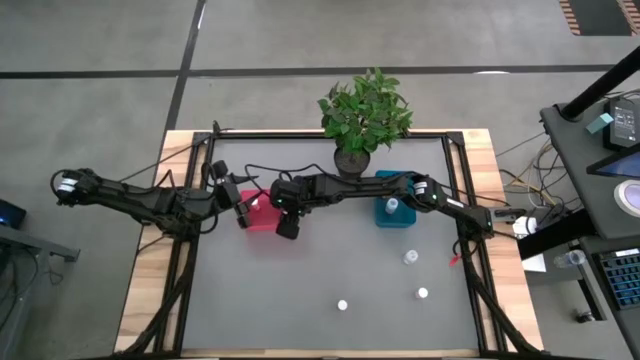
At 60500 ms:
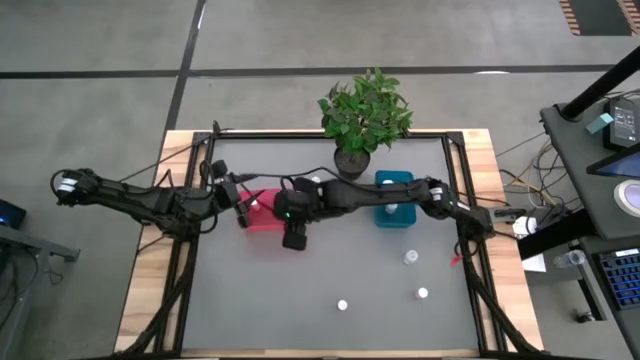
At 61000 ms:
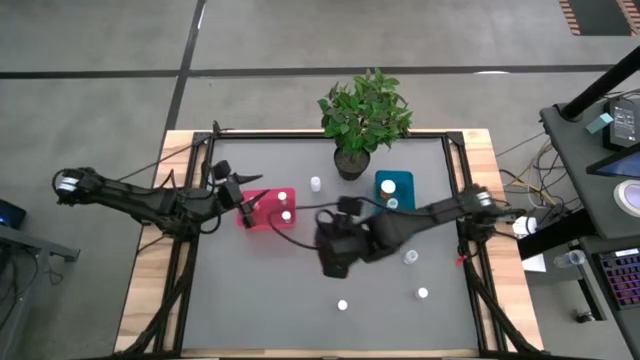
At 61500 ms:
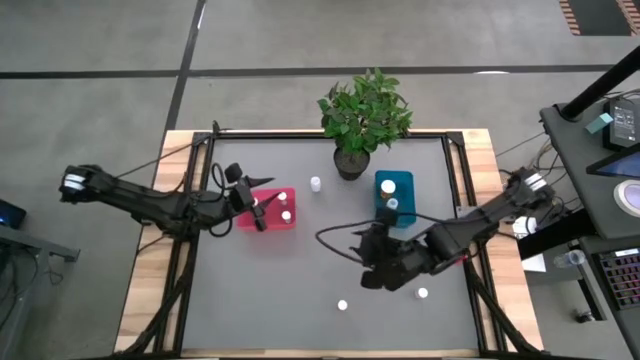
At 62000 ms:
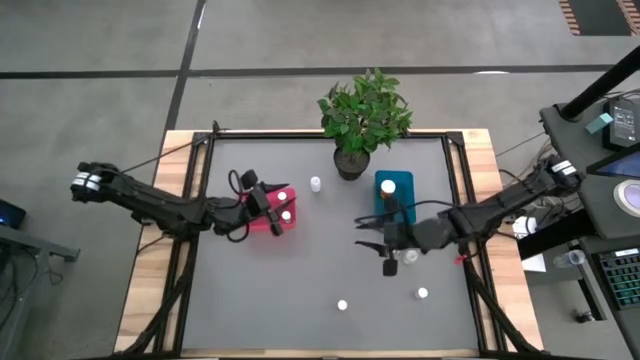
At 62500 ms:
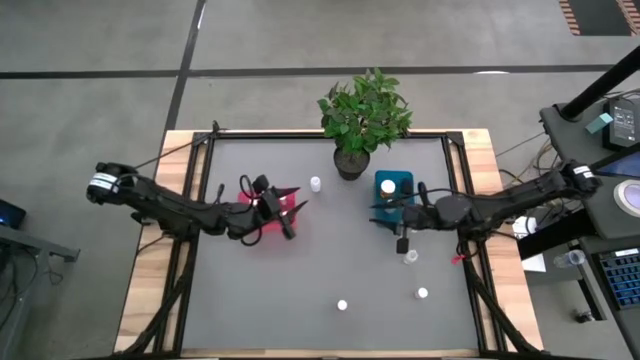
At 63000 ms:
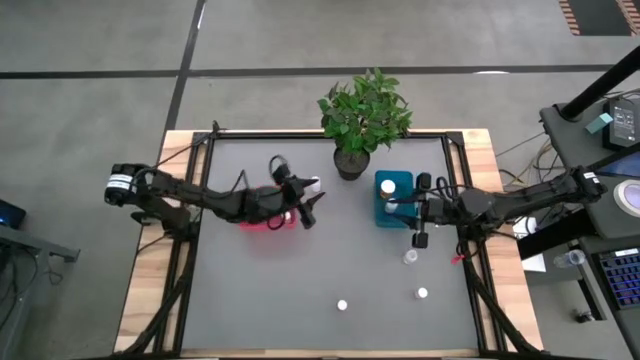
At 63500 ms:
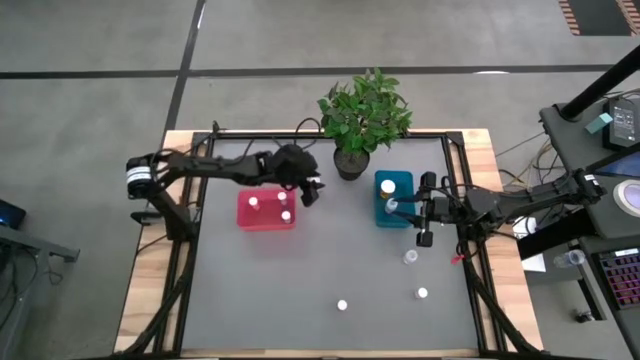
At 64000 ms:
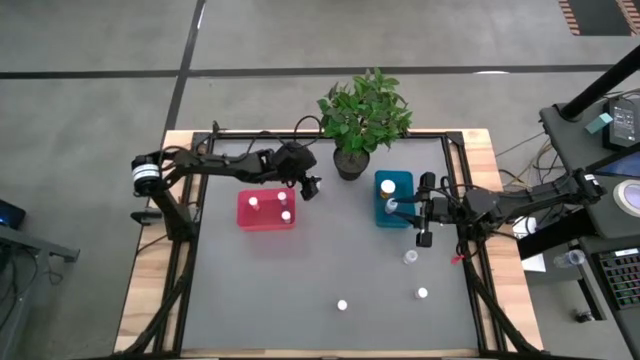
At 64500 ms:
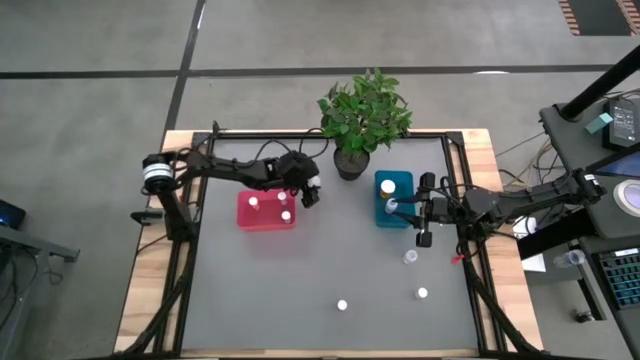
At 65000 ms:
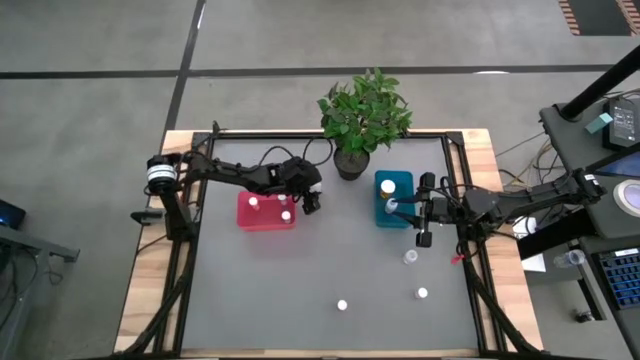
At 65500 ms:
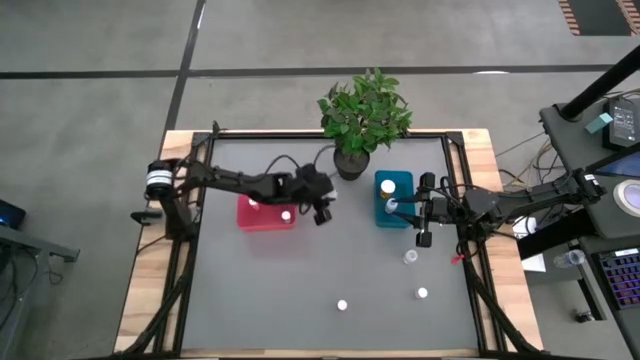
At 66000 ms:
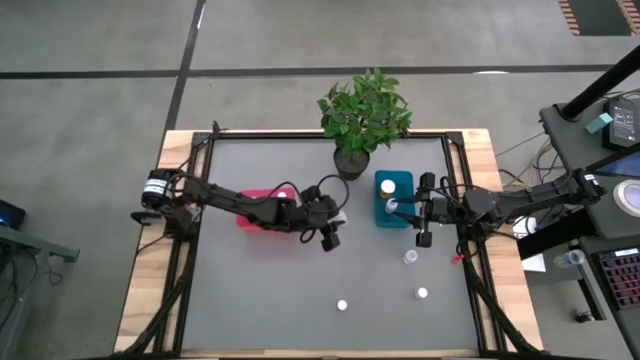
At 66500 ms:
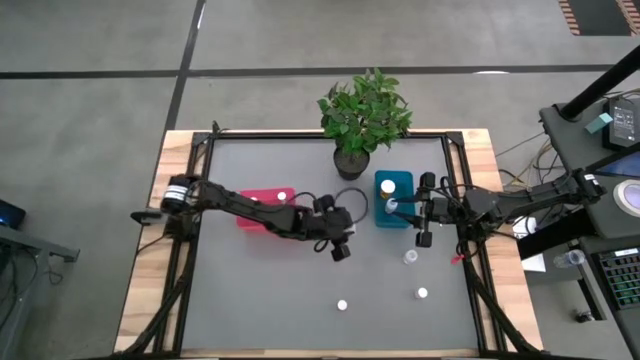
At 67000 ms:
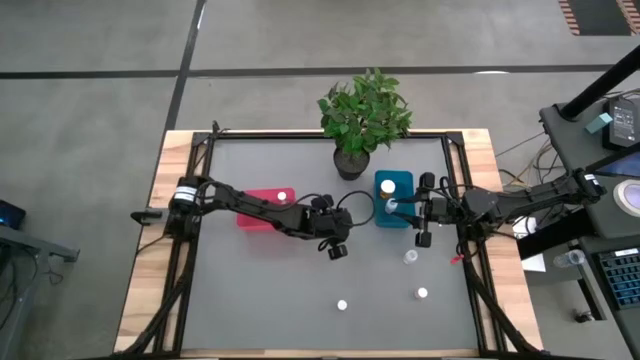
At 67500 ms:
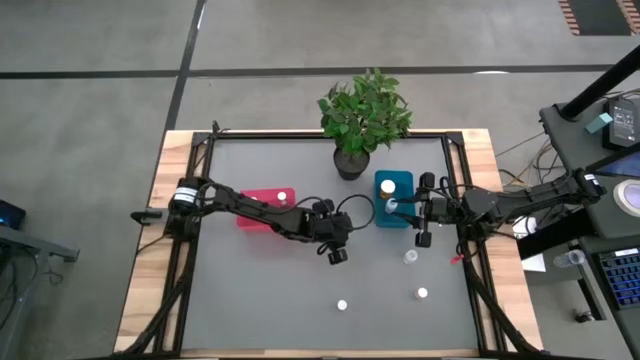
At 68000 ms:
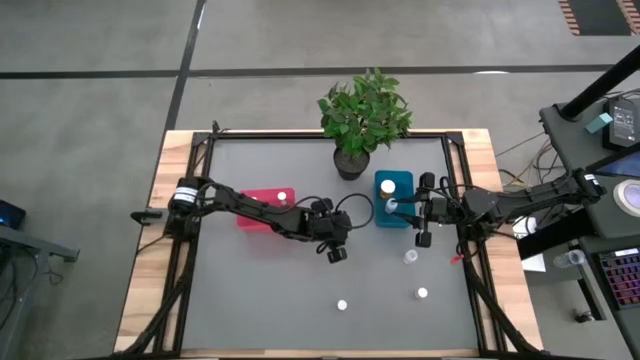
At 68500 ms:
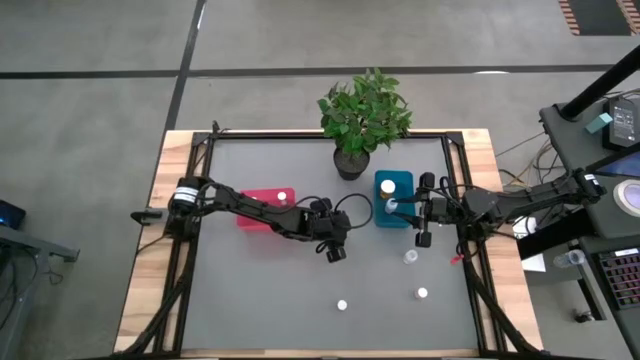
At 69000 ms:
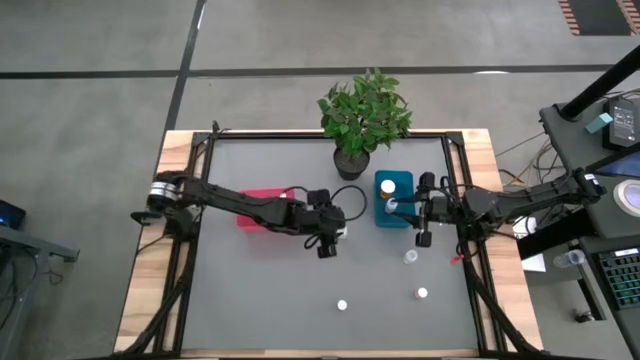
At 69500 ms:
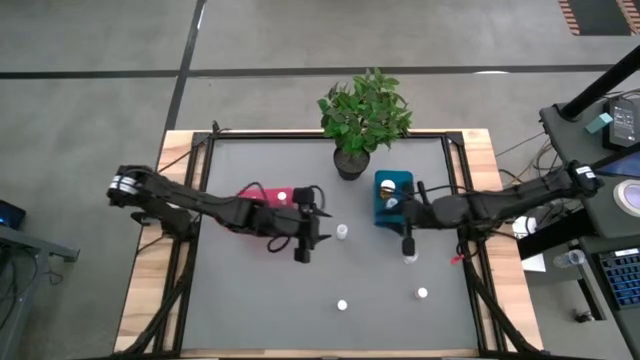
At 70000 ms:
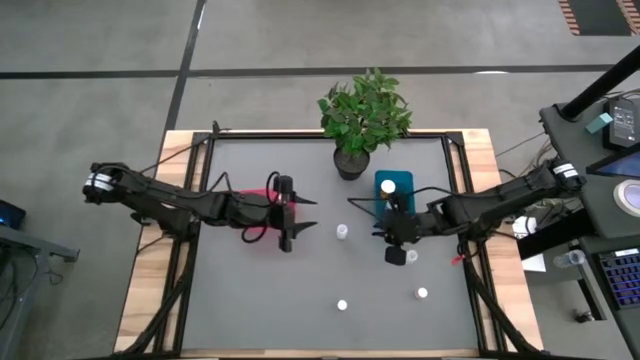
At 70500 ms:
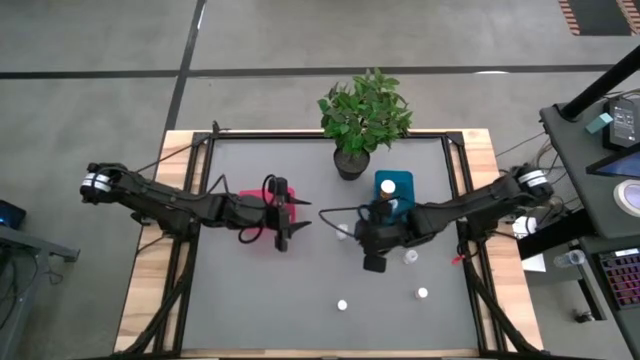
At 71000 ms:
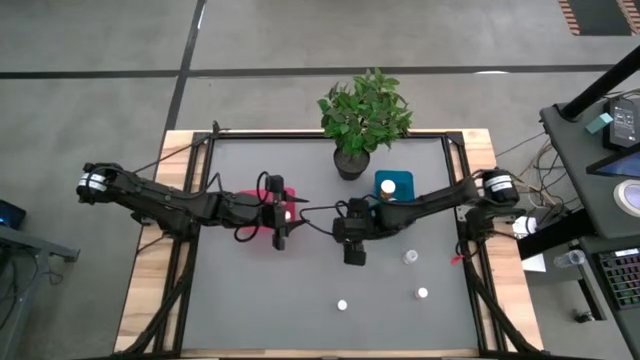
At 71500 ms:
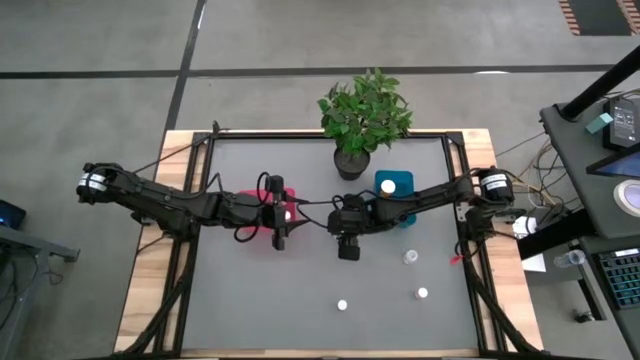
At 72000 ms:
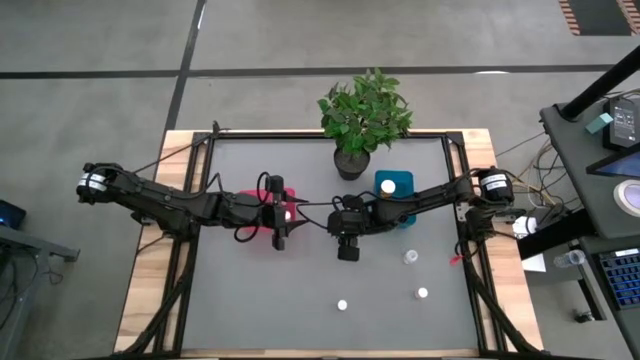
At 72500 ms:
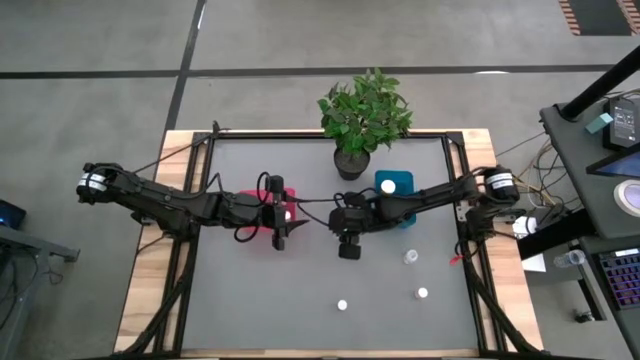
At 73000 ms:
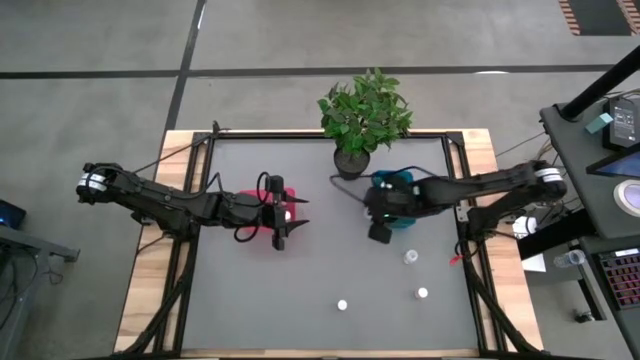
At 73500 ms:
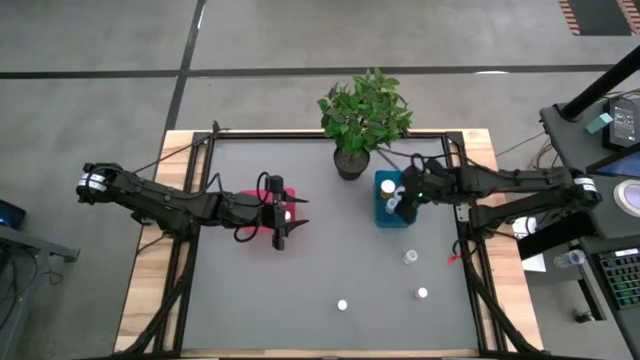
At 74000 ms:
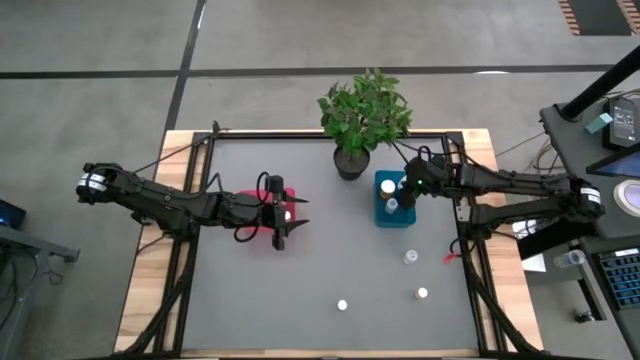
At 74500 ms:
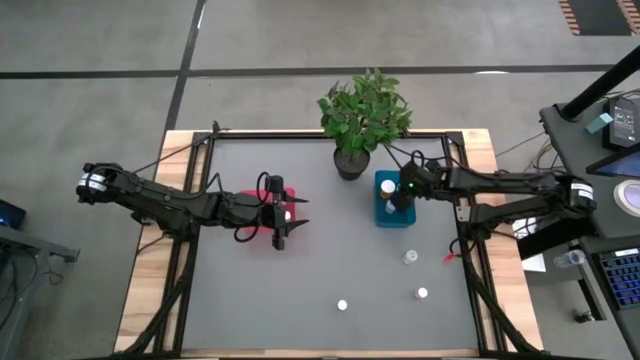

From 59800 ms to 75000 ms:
Task: Pick and place medicine bottles into bin by pill shape (circle, oval)
Put the large transparent pill bottle into the blue bin

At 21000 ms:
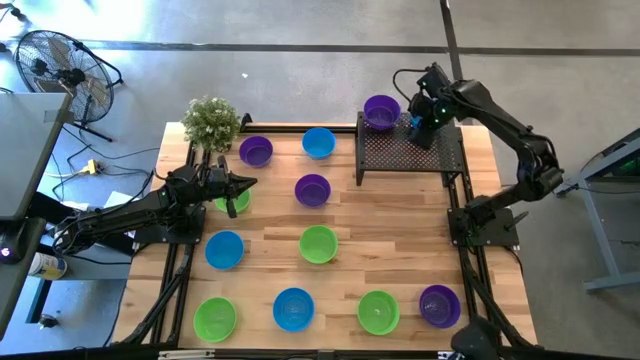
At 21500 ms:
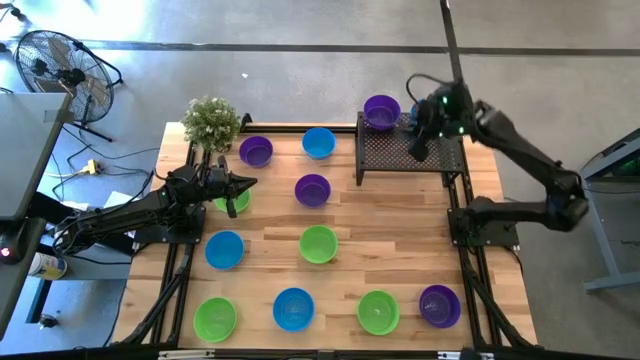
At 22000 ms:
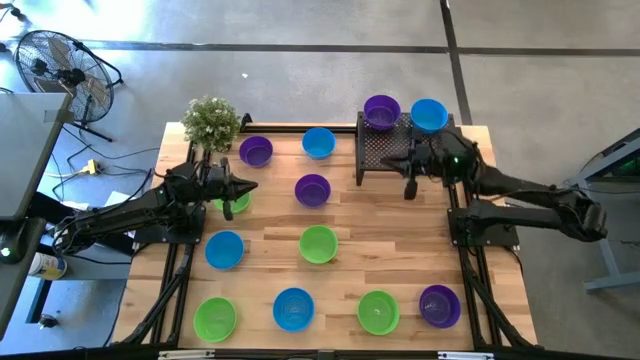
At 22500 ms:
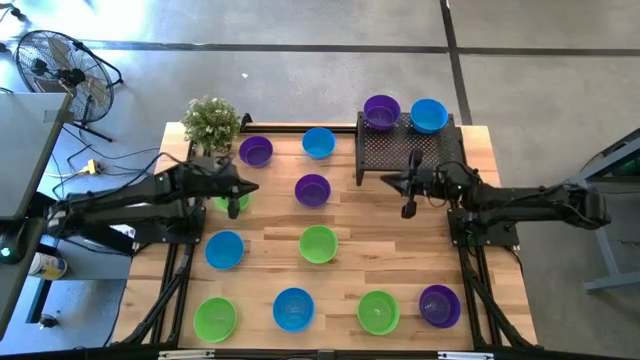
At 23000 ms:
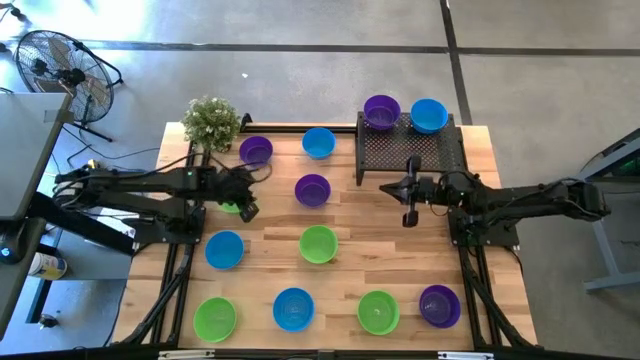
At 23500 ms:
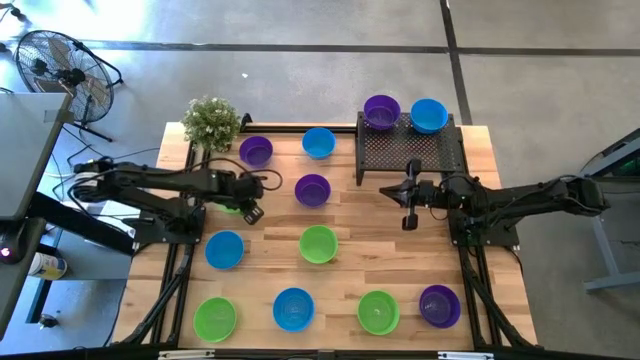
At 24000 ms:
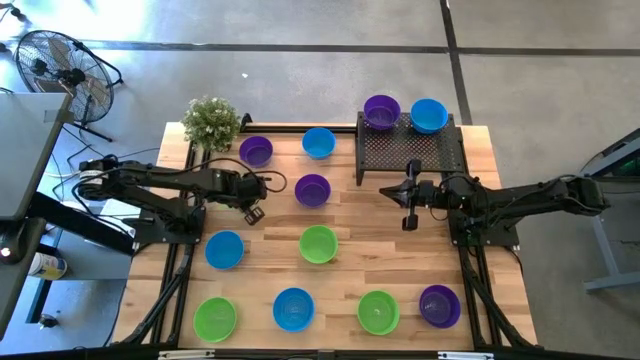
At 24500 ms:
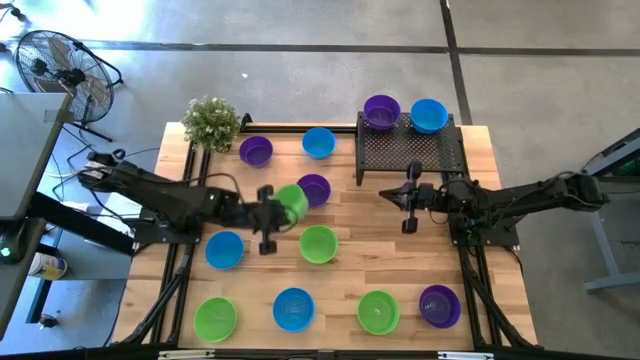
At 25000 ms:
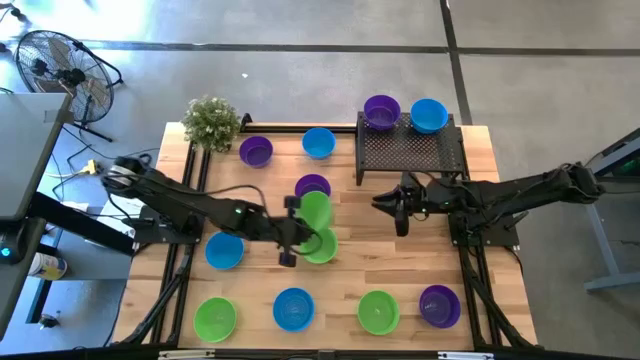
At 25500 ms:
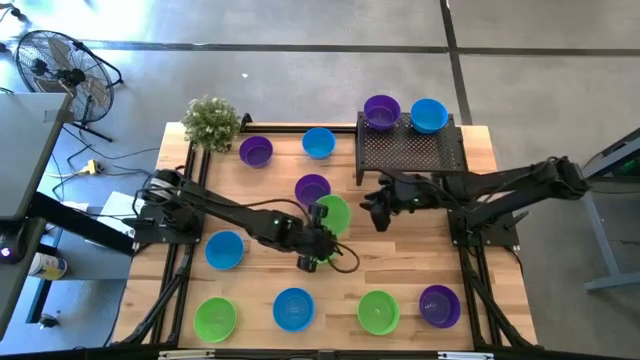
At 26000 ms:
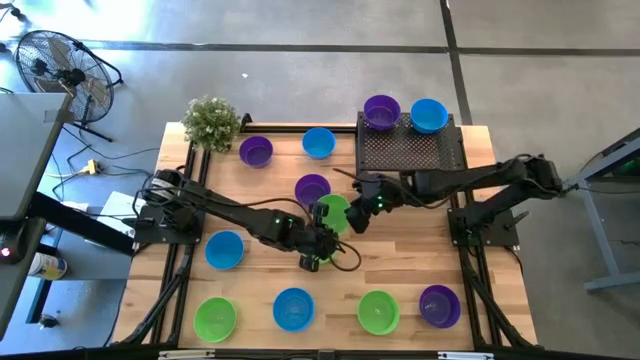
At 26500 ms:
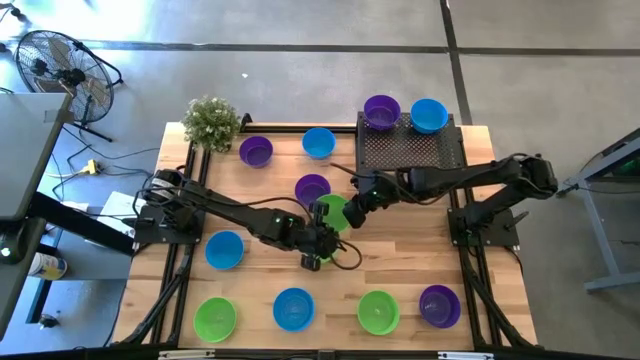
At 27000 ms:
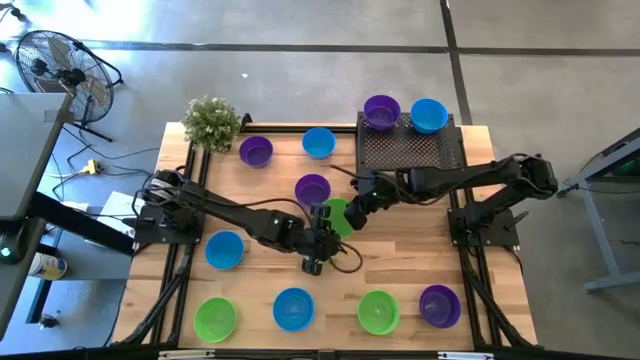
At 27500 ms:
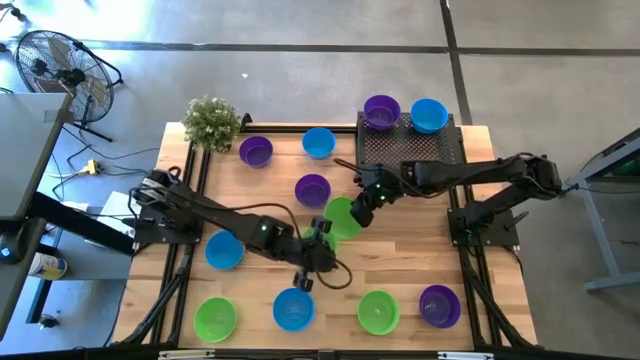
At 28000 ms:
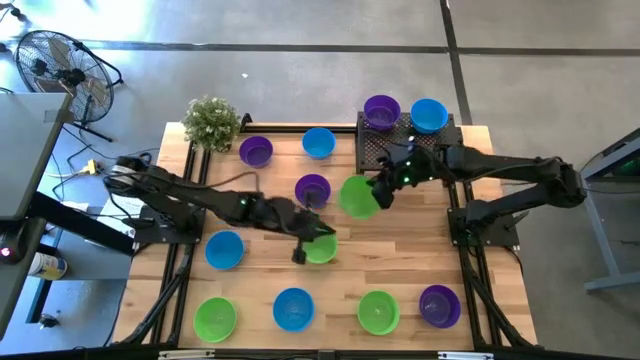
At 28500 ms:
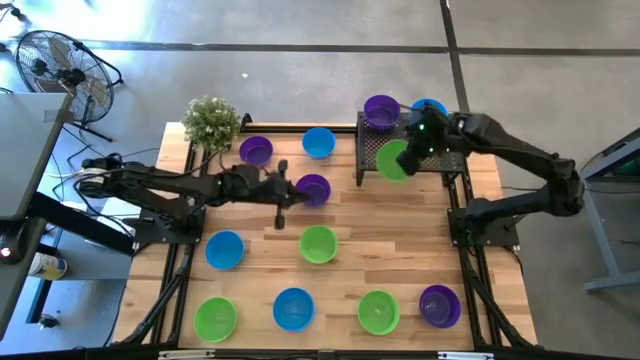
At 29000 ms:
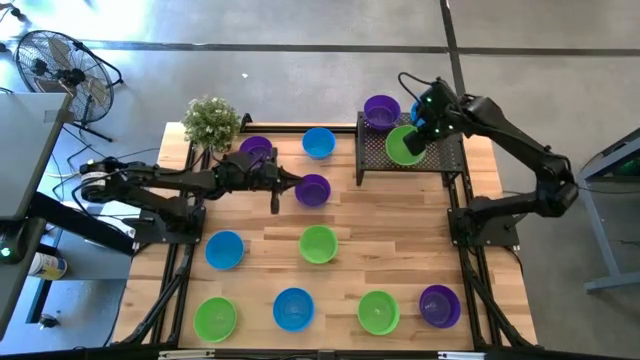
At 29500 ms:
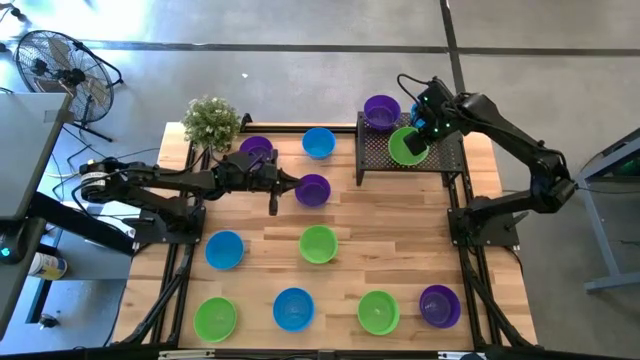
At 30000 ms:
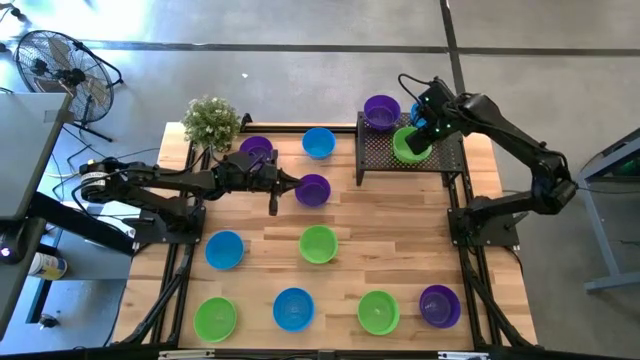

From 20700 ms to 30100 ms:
Task: Pick & Place Mini bowls
Put the green bowl on the shelf
